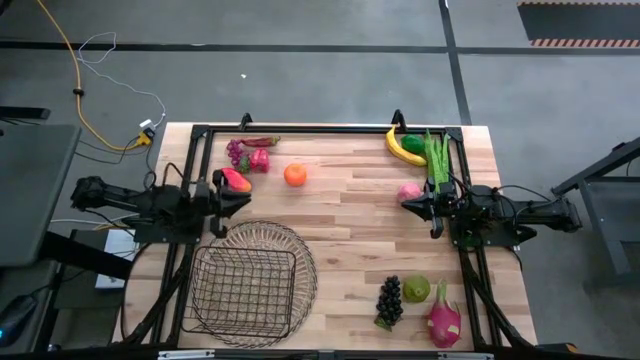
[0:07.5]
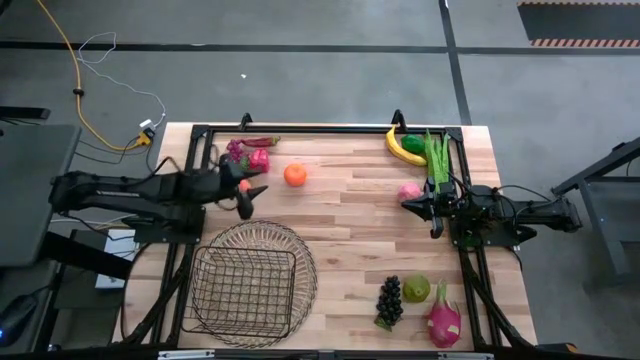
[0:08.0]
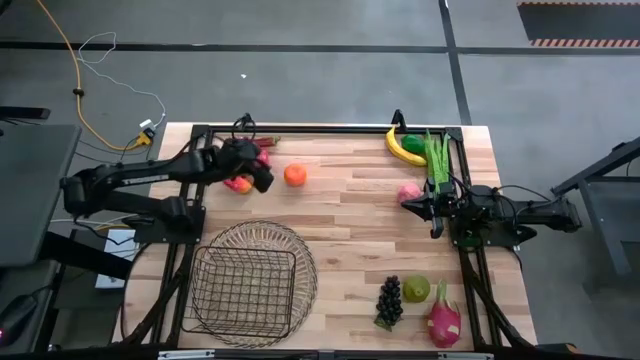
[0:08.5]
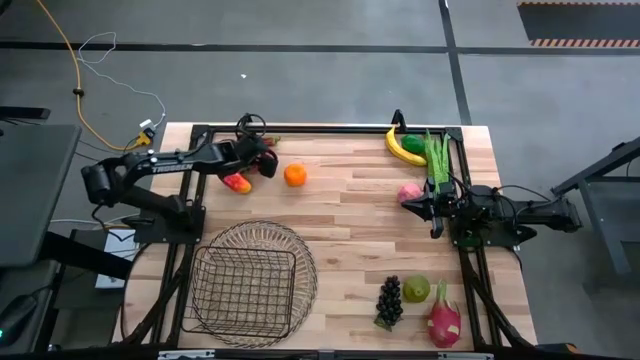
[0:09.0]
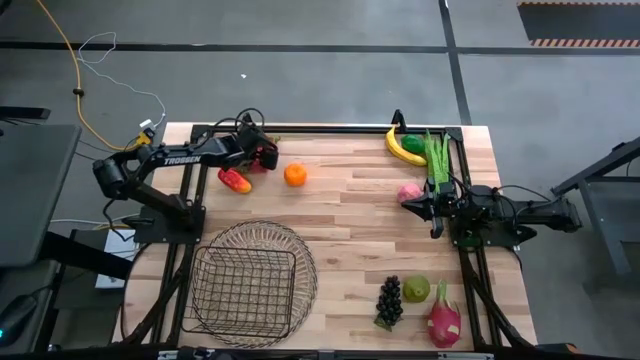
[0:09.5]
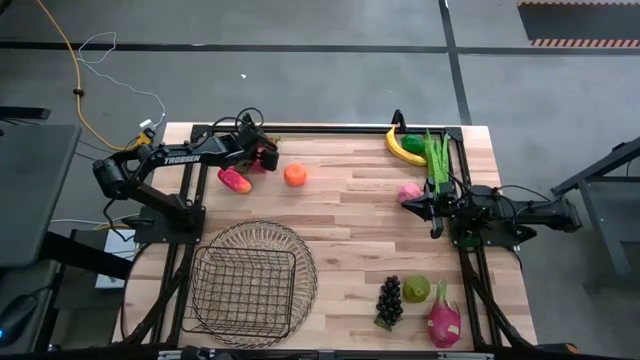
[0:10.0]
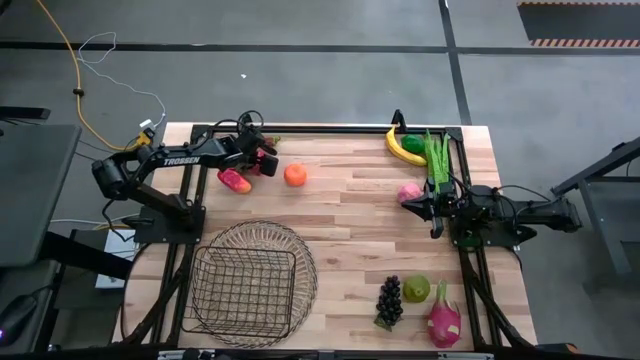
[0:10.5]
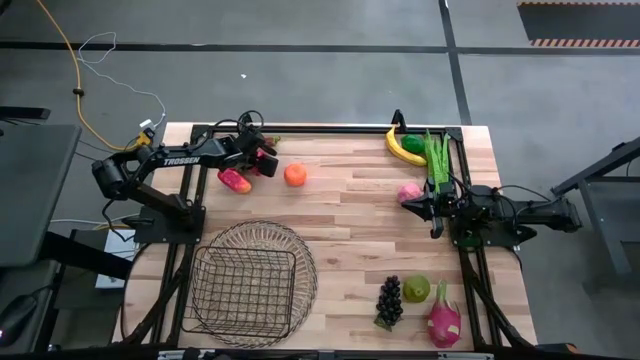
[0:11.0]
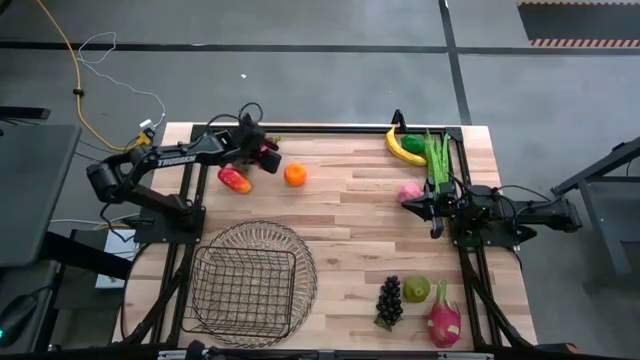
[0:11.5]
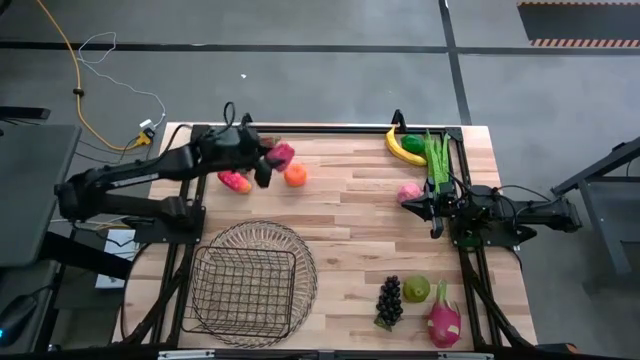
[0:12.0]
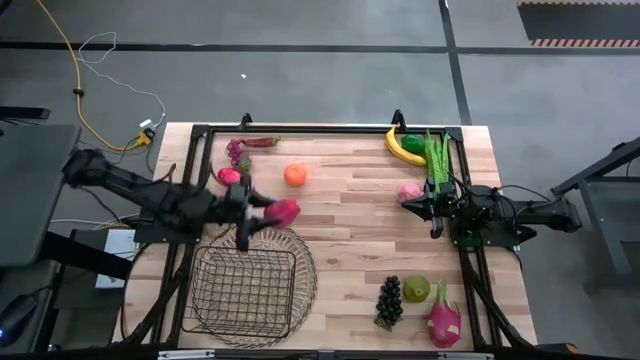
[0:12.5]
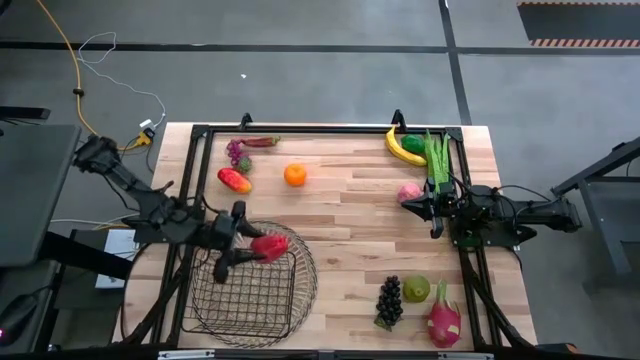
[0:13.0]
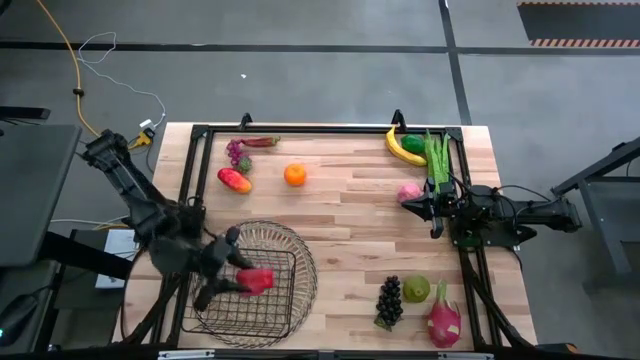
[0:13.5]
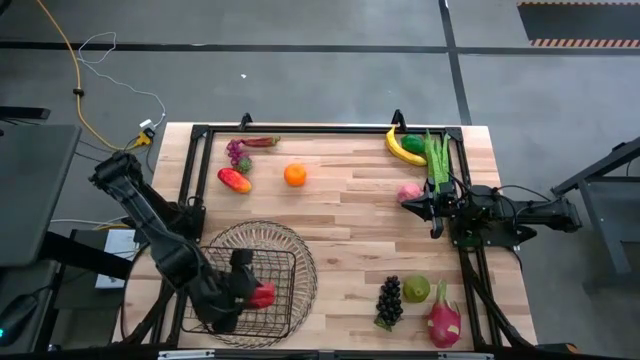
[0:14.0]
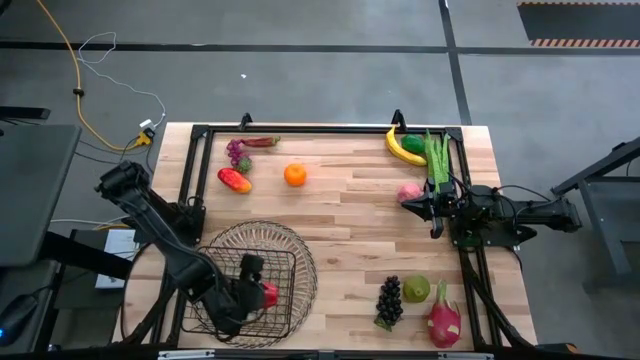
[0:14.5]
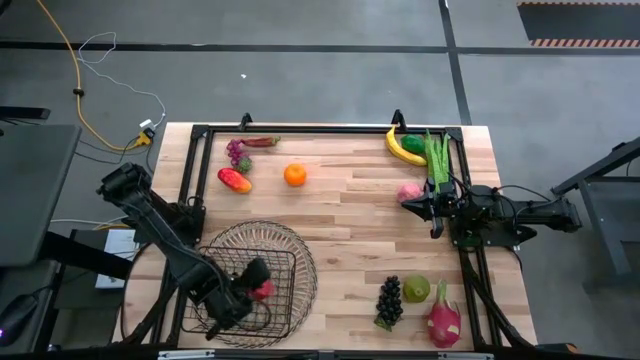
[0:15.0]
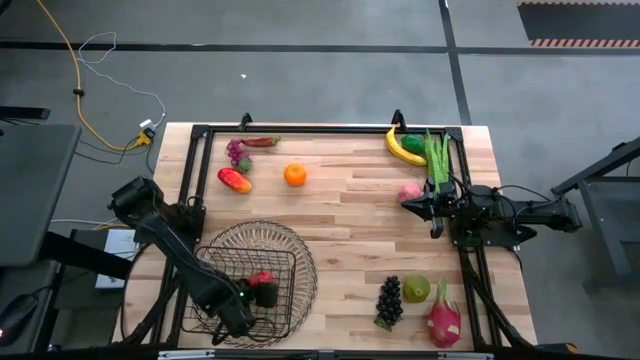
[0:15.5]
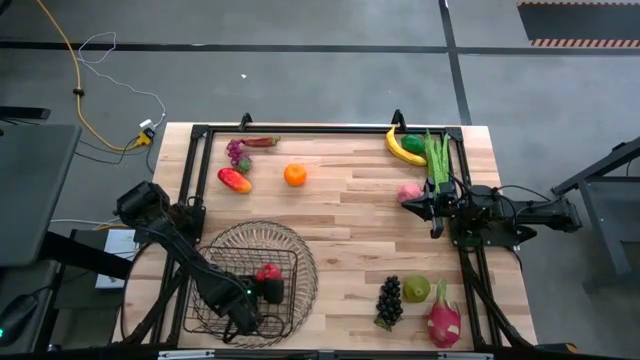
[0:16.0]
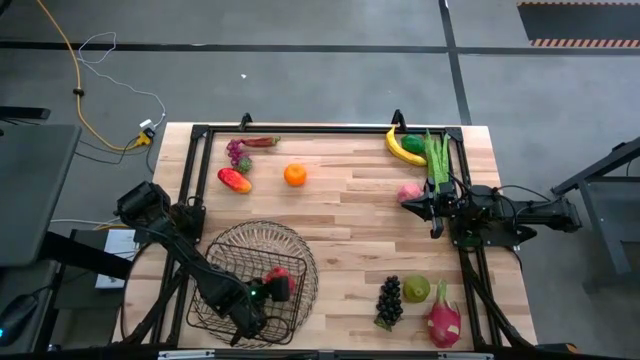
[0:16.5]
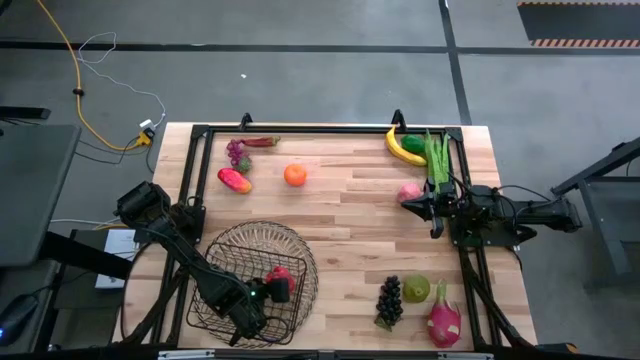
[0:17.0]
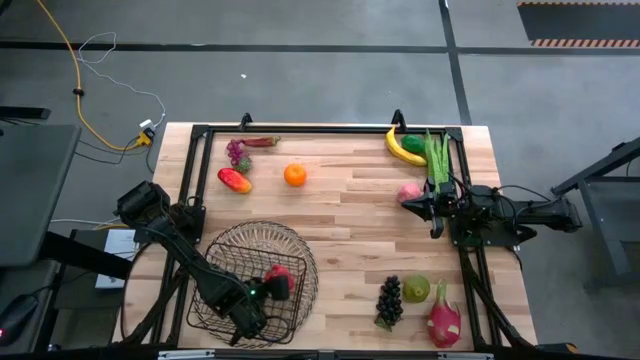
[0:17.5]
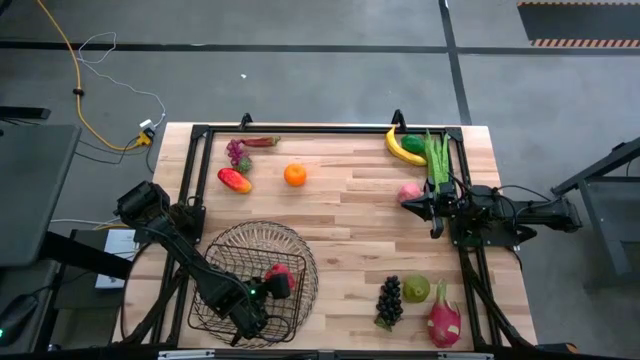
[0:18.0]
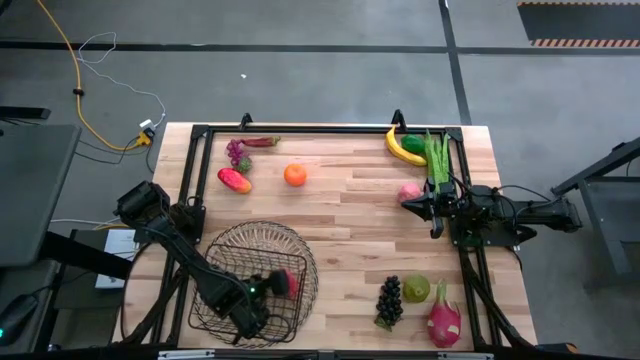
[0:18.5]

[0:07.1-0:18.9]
Task: Build produce basket
Put the red bell pepper into the black wire basket

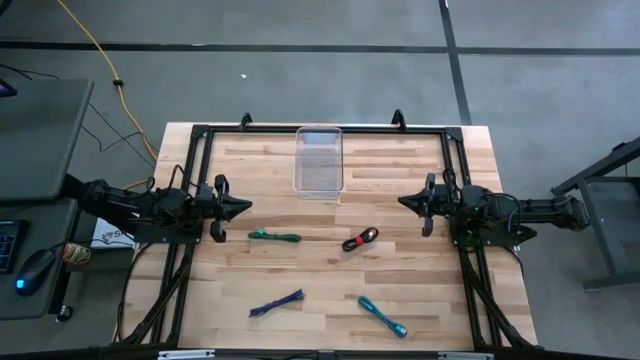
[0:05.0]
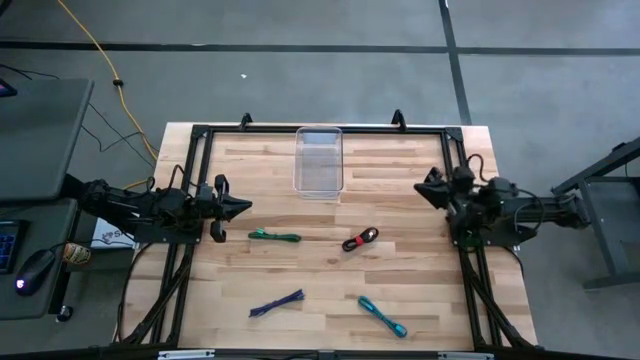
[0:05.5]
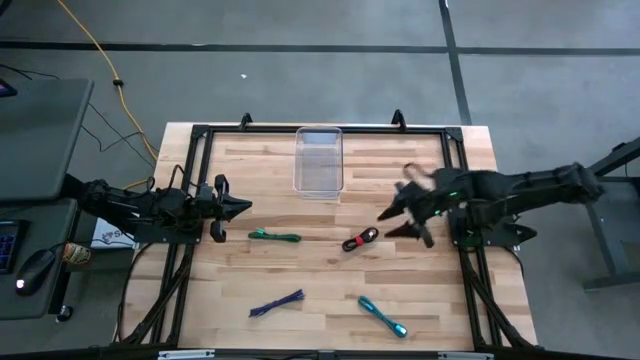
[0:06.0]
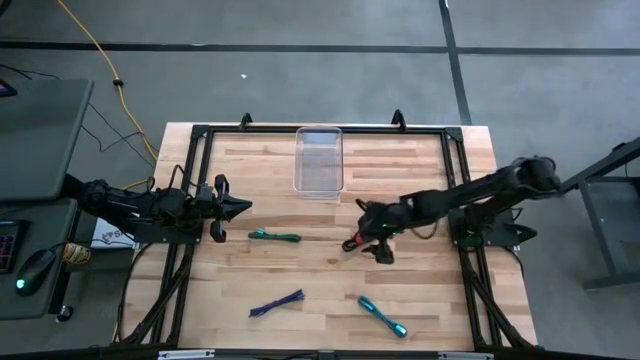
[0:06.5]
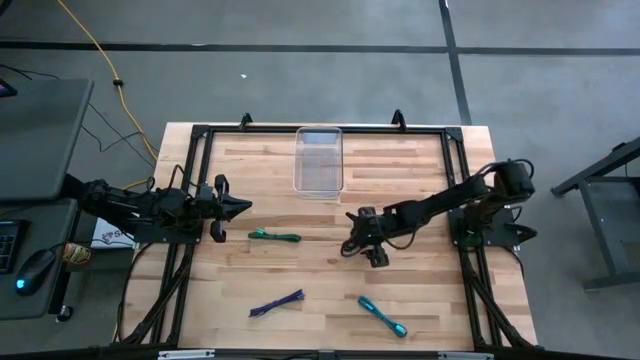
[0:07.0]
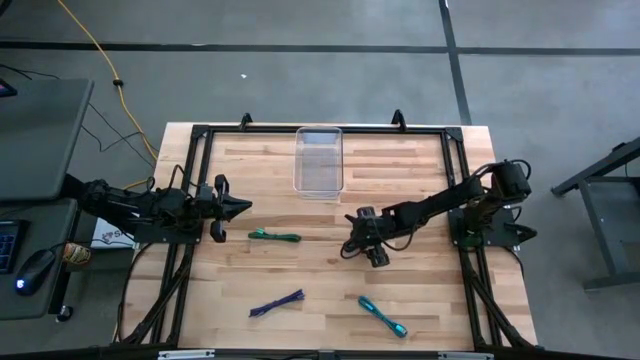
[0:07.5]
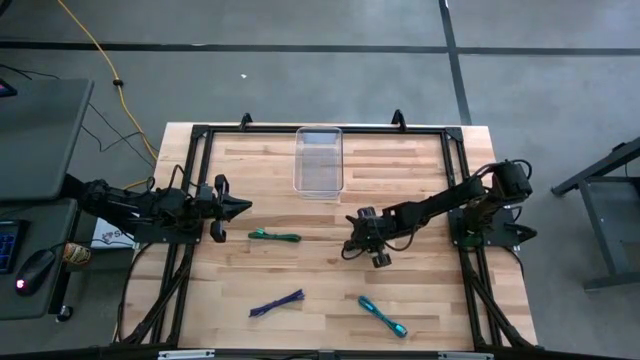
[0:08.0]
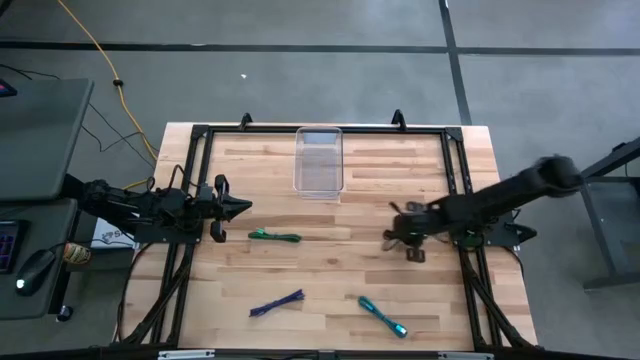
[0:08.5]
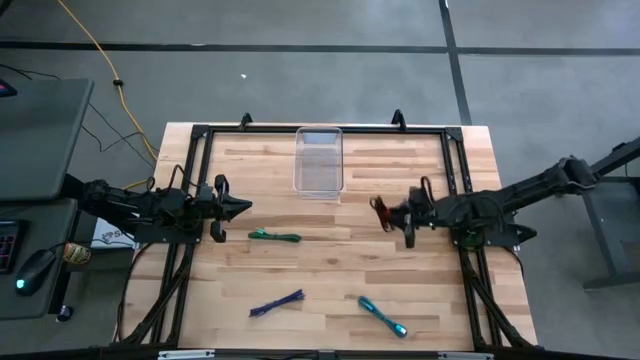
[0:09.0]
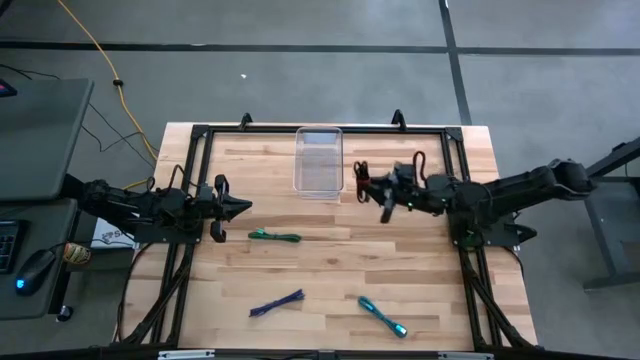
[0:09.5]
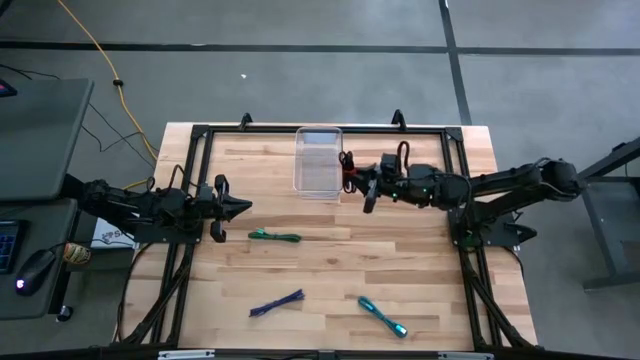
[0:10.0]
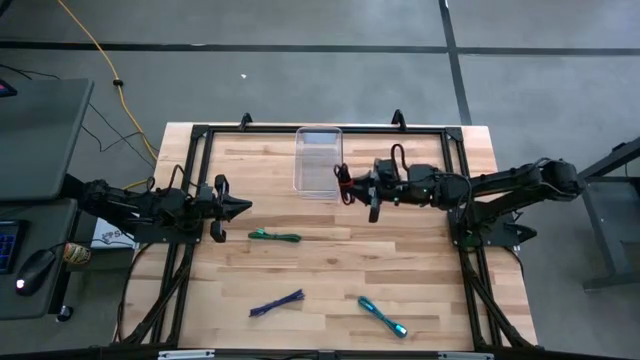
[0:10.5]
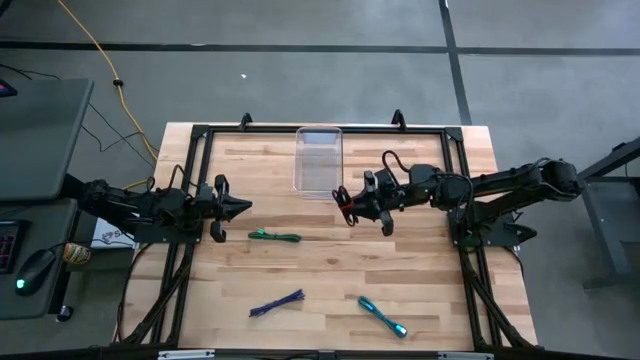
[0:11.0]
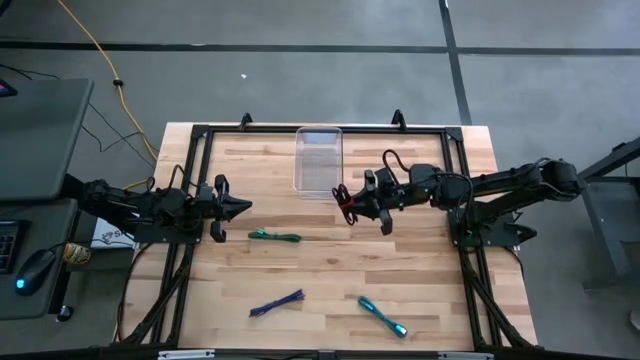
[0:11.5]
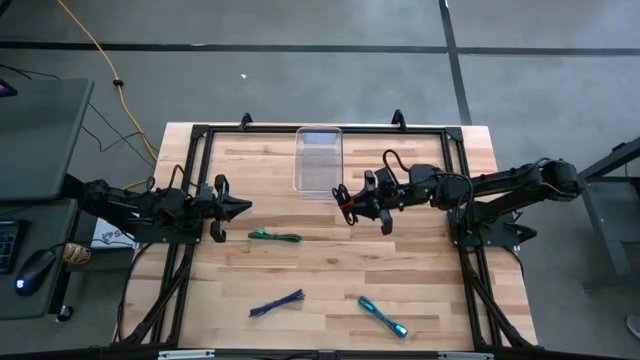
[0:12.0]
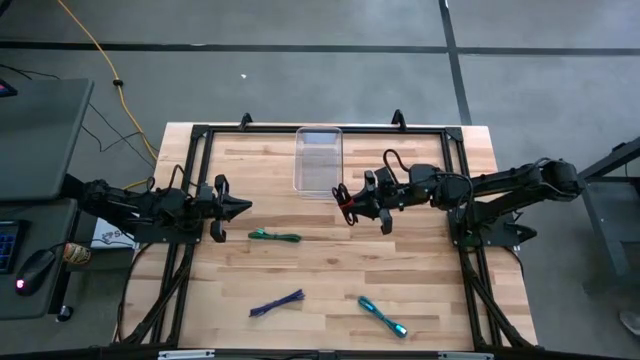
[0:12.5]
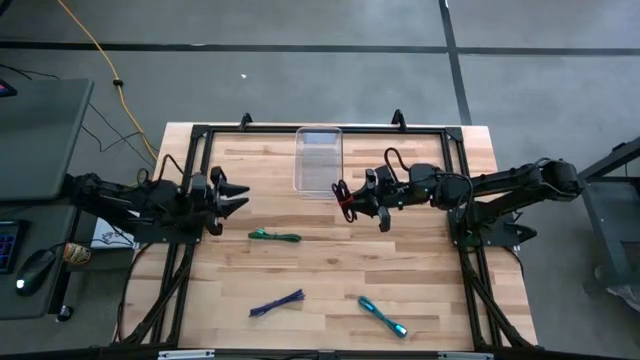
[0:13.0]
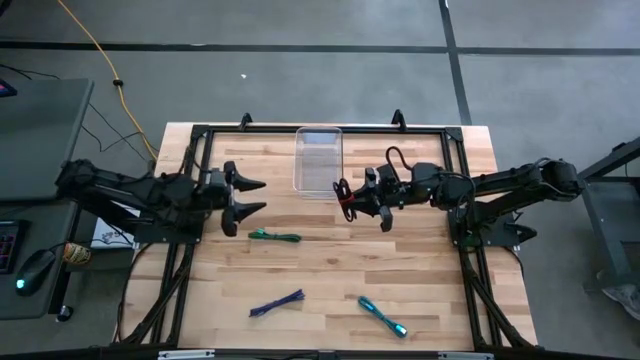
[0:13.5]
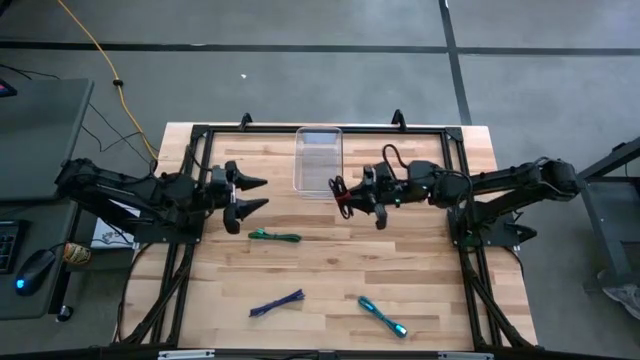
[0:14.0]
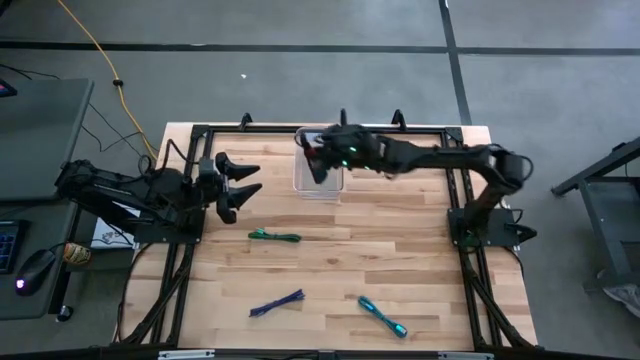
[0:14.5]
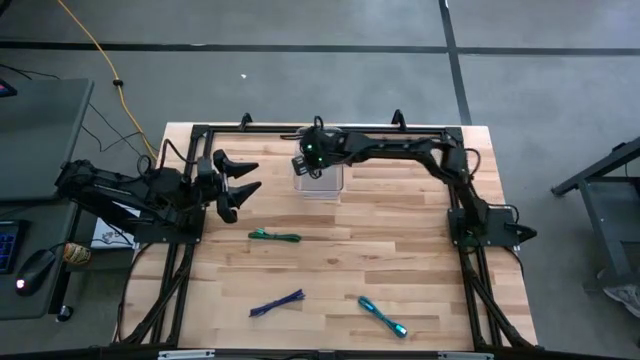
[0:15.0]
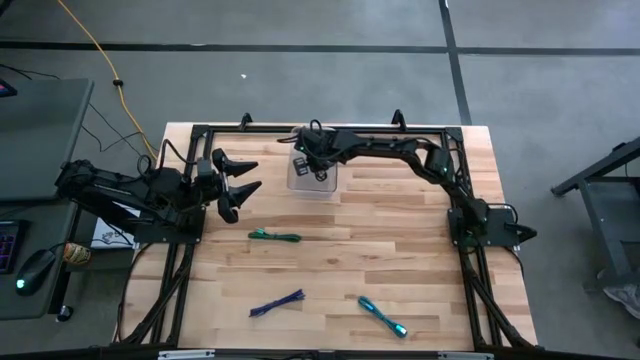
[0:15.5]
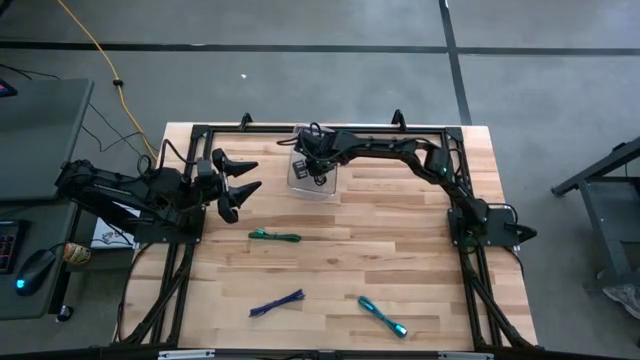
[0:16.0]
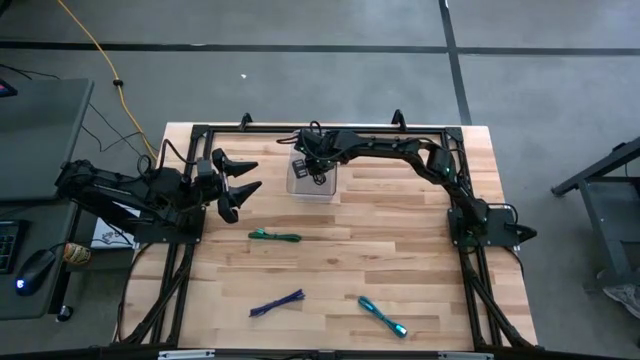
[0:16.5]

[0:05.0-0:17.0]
Task: Pick and place USB-C Cables
Put the black charger cable into the transparent bin
